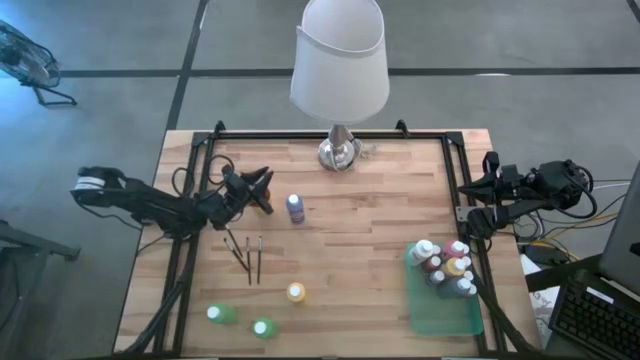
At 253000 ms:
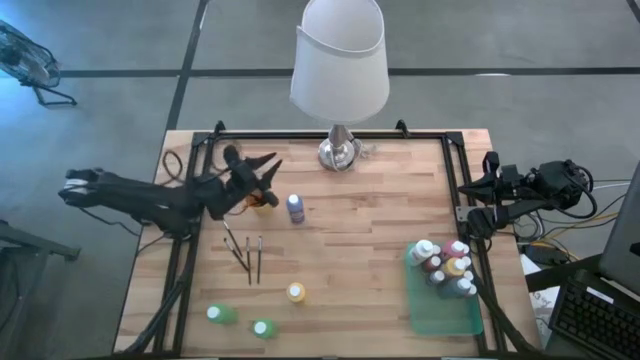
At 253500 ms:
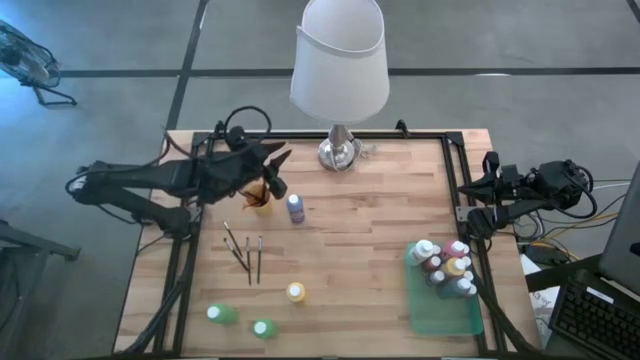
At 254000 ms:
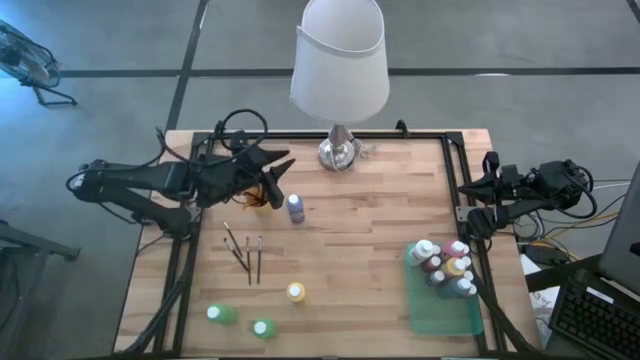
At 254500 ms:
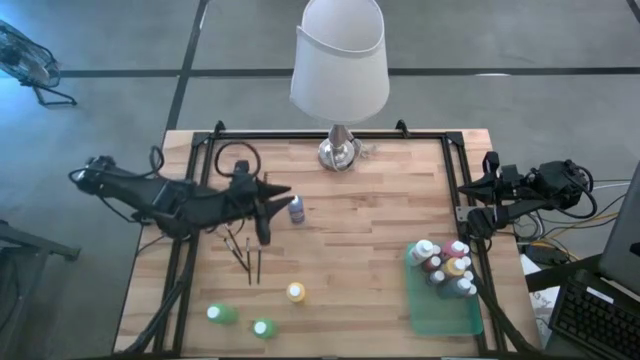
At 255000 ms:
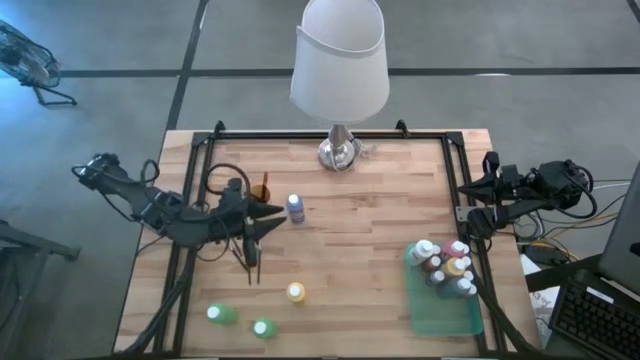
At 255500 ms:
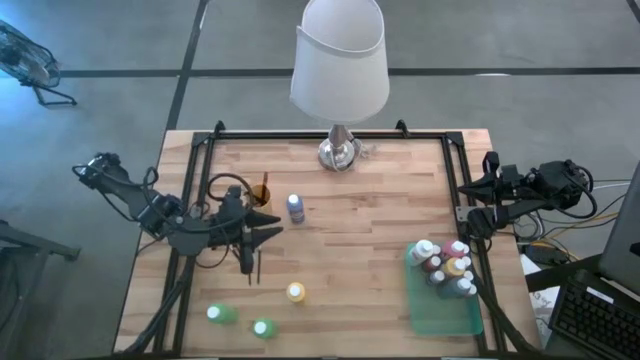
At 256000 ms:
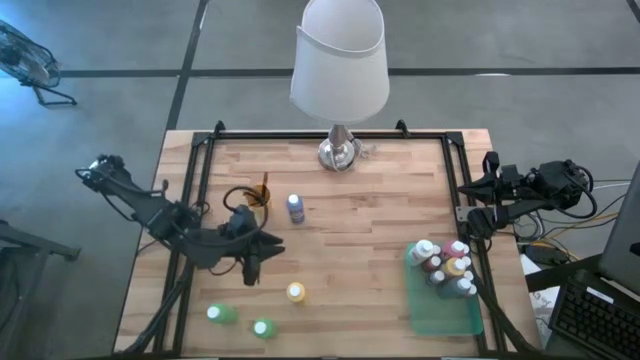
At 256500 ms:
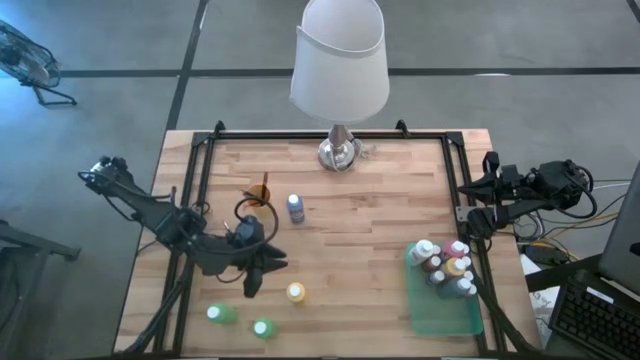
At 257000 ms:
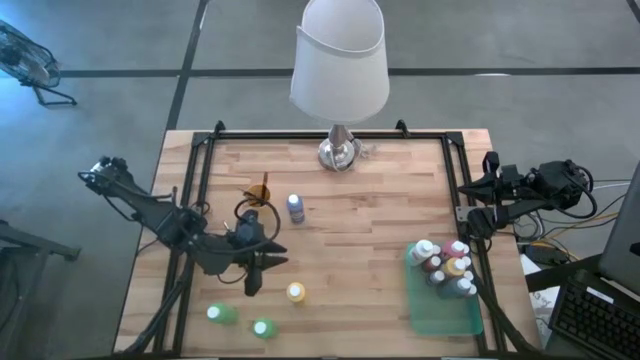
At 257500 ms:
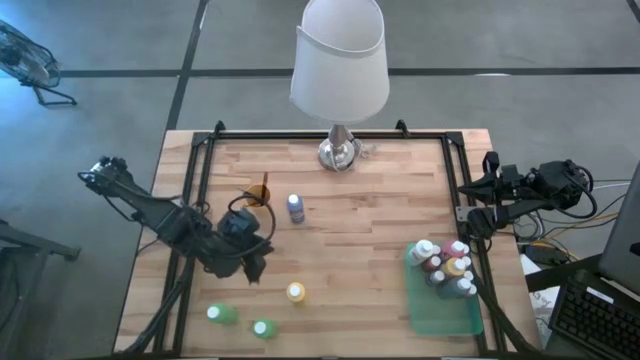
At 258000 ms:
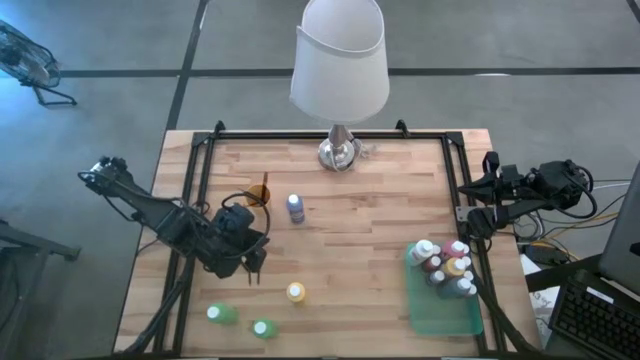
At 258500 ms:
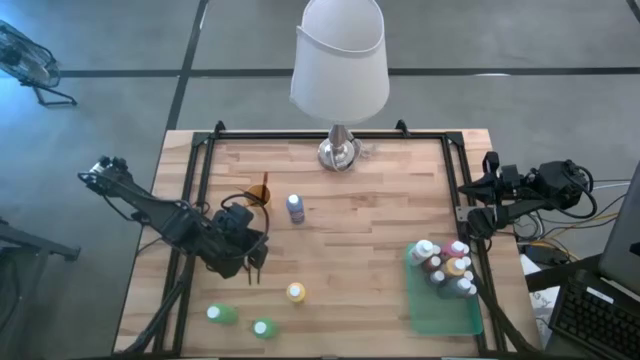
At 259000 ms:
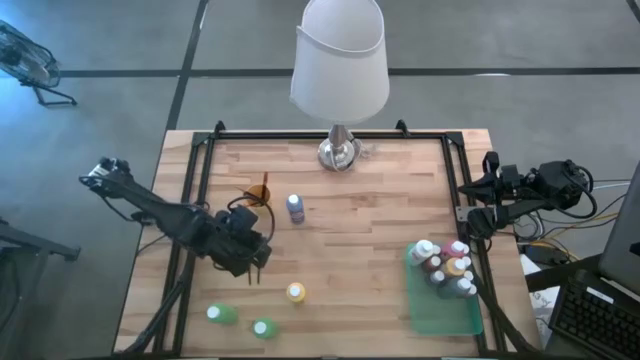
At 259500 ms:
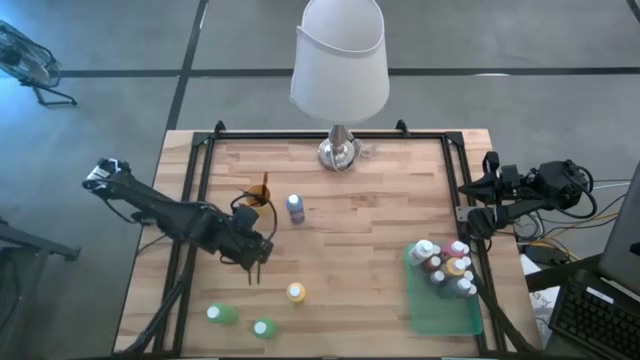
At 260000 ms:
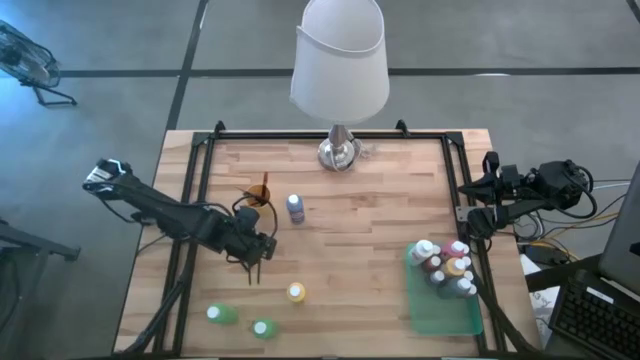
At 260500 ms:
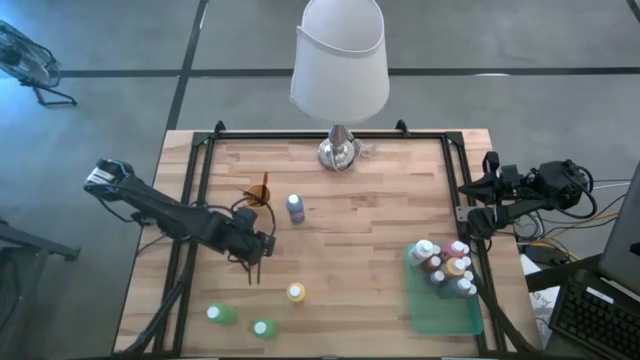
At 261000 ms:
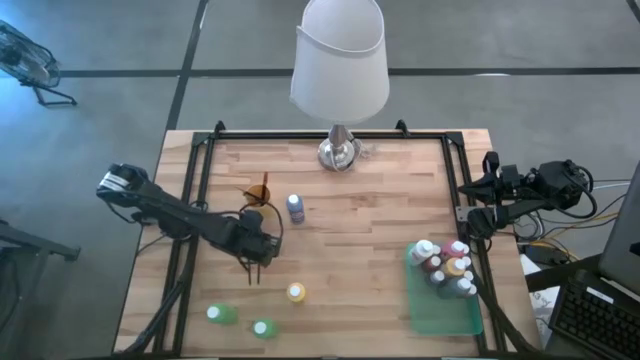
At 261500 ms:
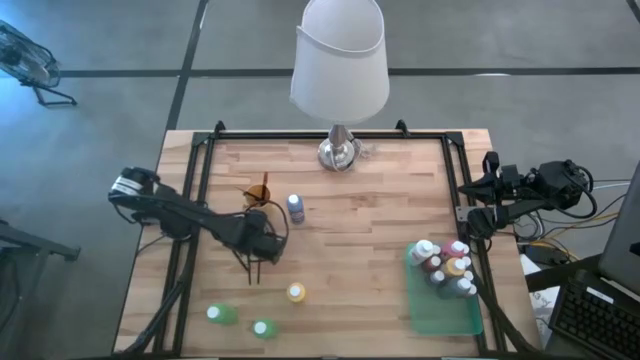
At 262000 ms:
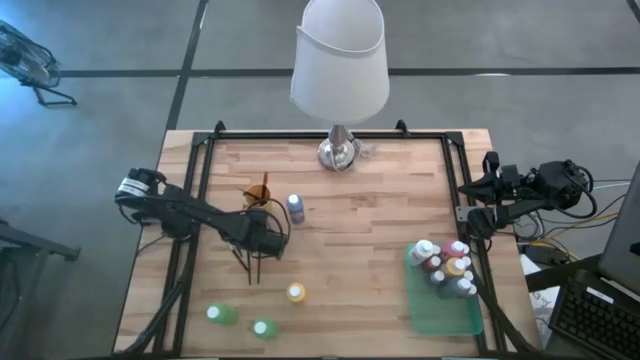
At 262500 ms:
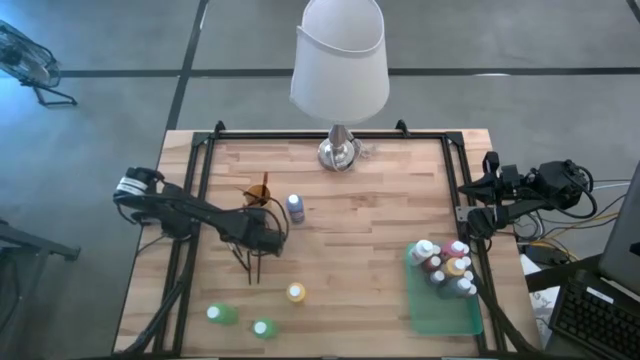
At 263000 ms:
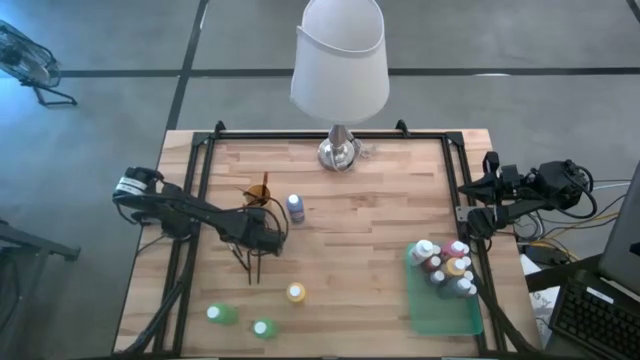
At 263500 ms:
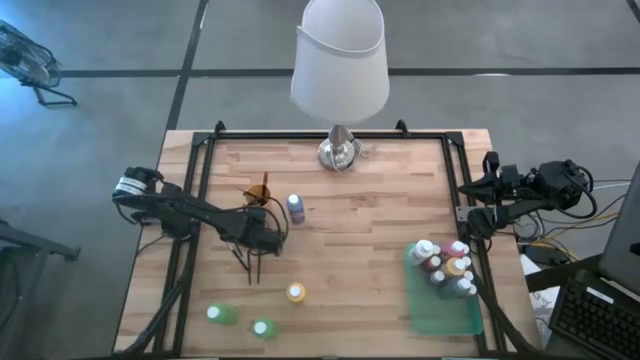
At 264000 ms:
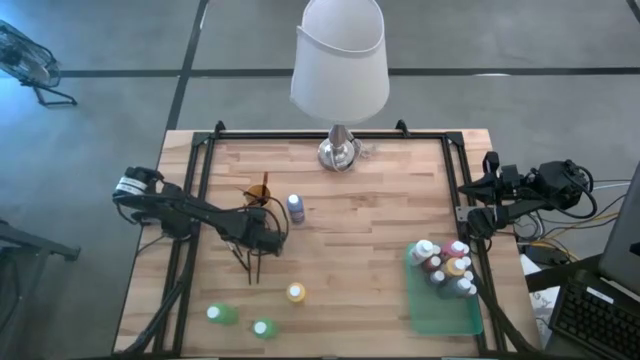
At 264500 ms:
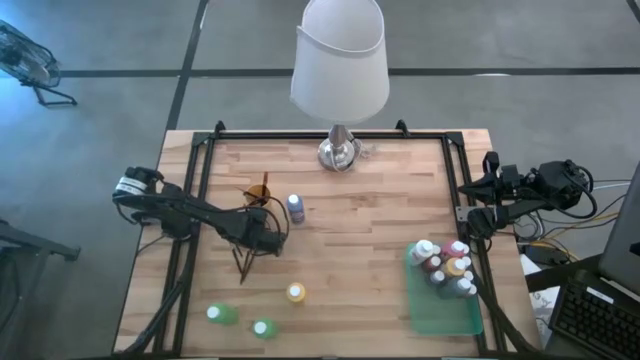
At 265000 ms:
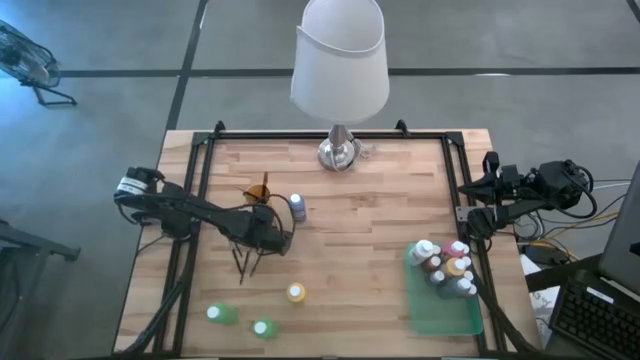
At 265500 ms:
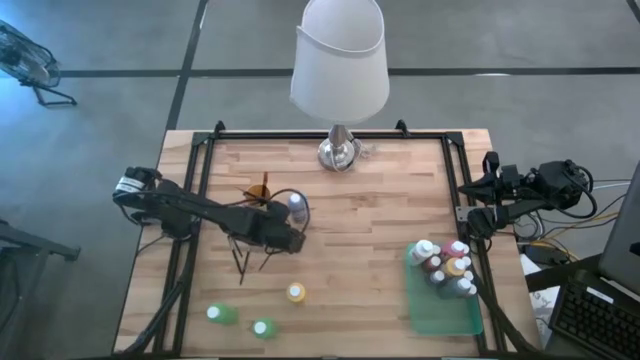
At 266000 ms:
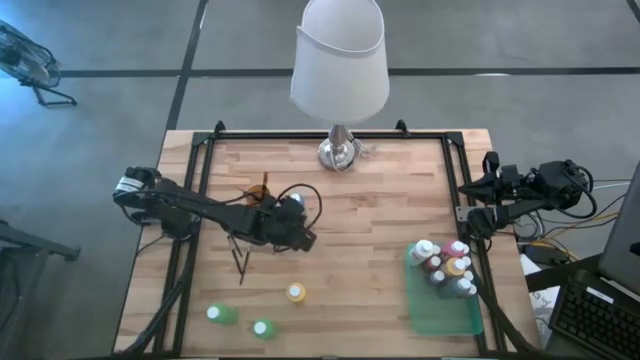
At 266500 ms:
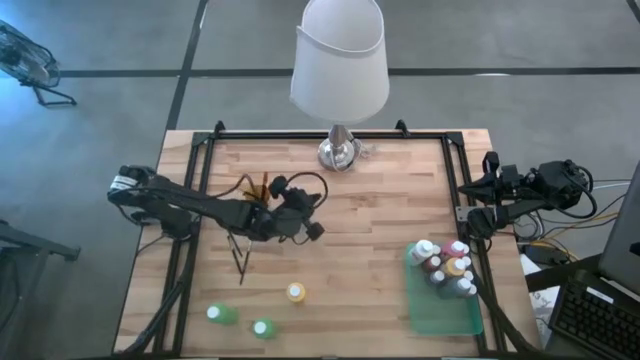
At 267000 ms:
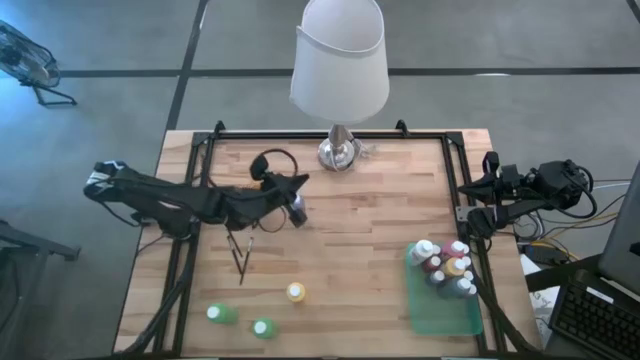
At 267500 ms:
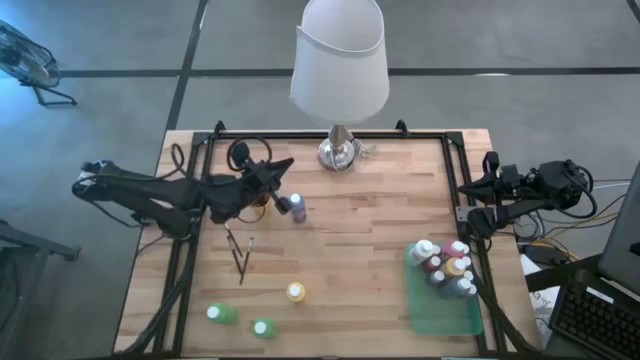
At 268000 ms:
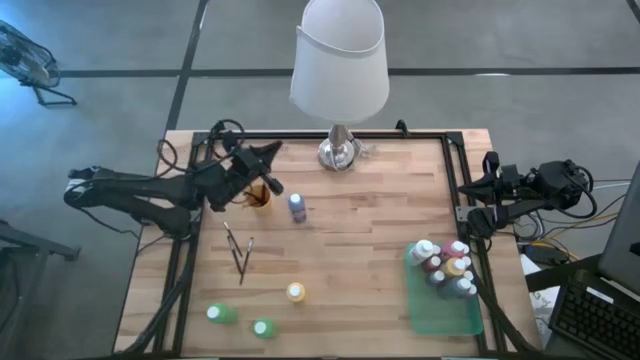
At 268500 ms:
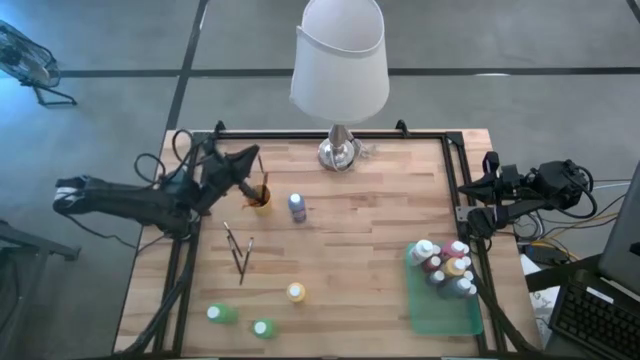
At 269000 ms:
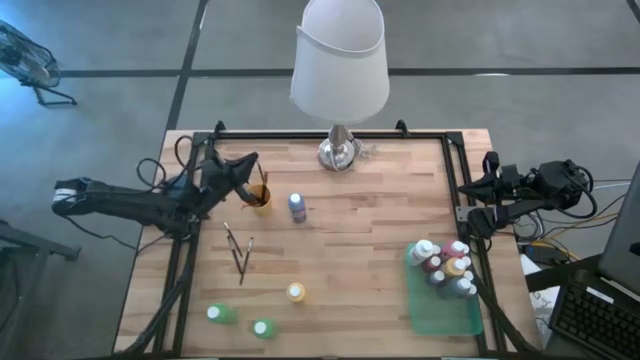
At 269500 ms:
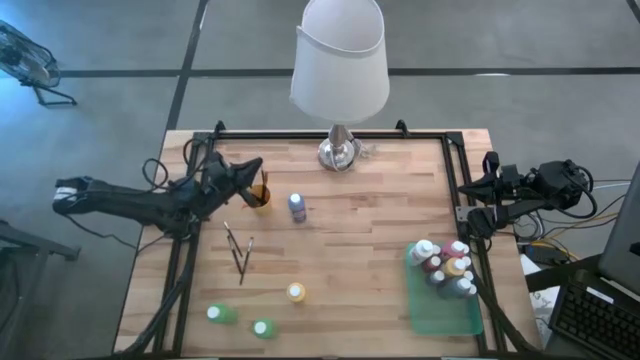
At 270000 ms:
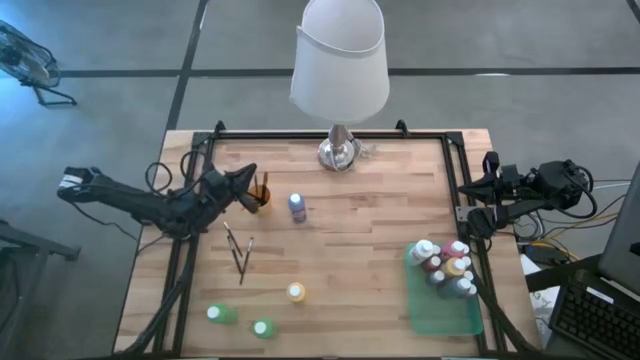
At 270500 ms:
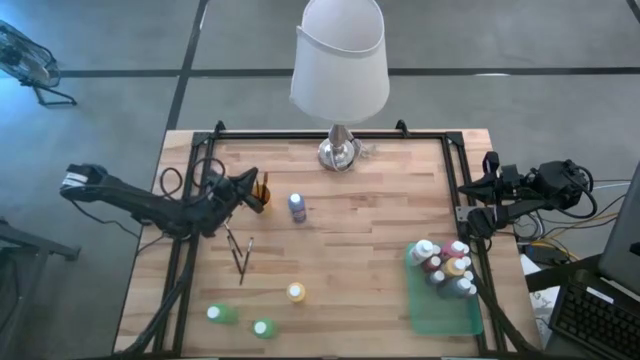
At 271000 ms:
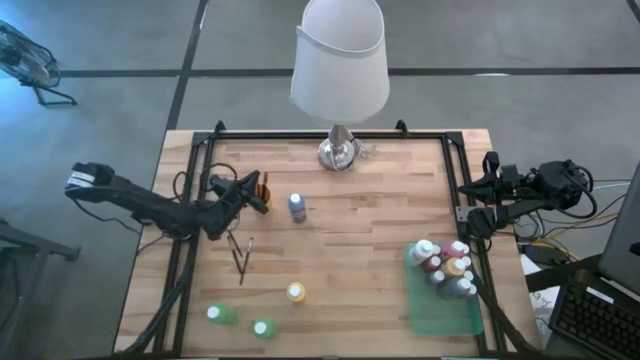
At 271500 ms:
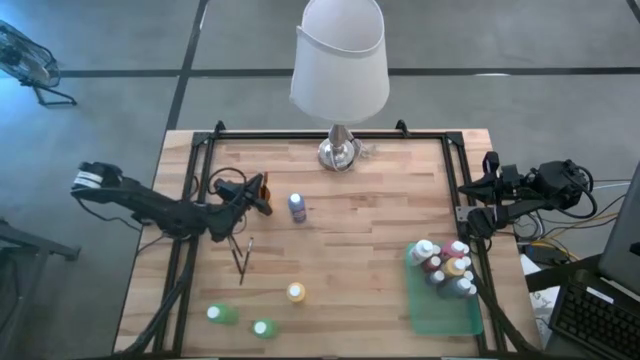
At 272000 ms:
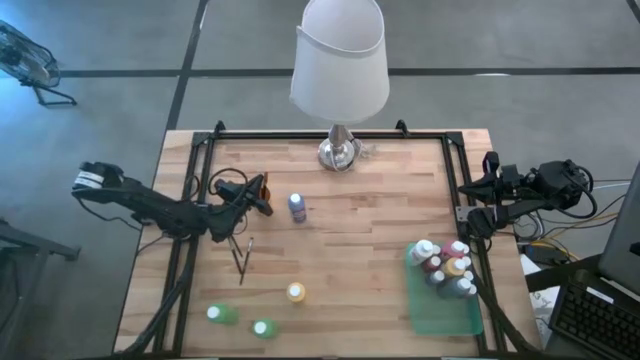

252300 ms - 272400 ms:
Task: Pick & Place Paint Supplies
Put the silver paint brush into the yellow cup
